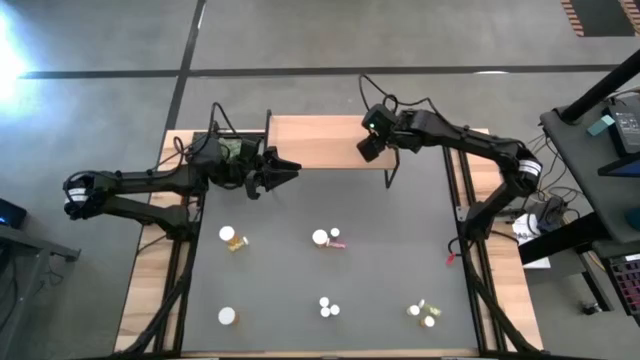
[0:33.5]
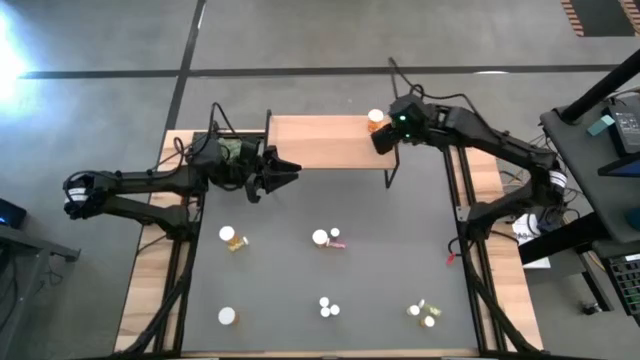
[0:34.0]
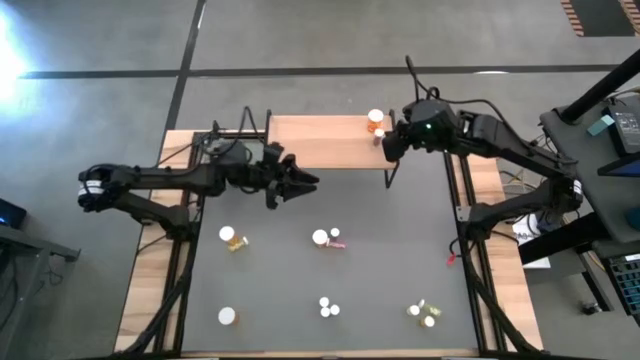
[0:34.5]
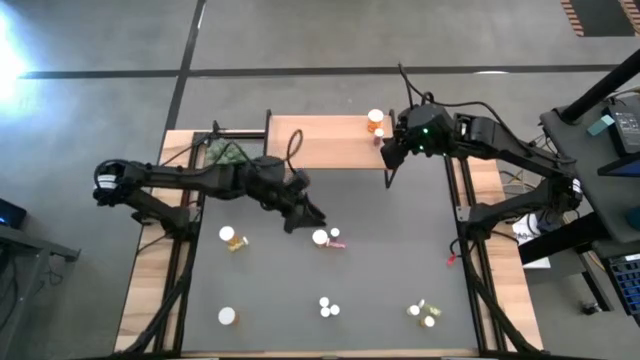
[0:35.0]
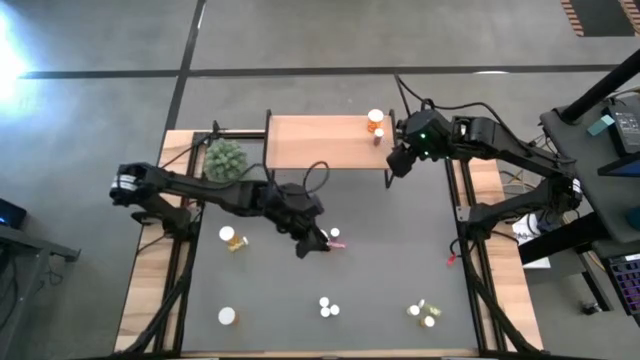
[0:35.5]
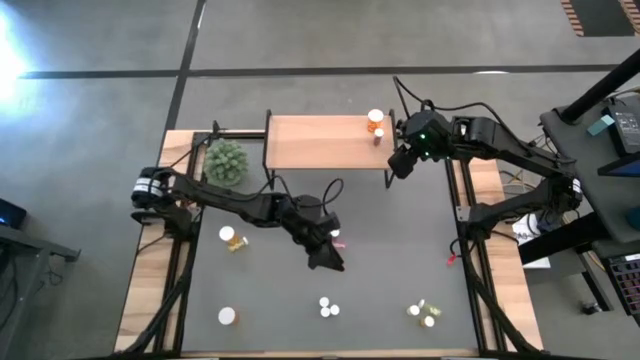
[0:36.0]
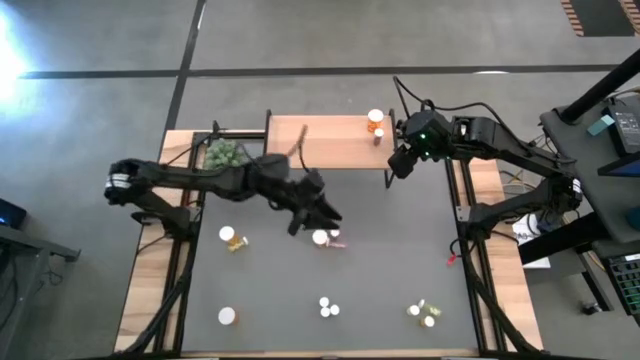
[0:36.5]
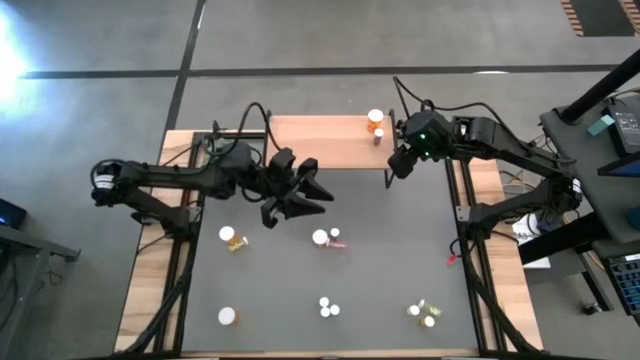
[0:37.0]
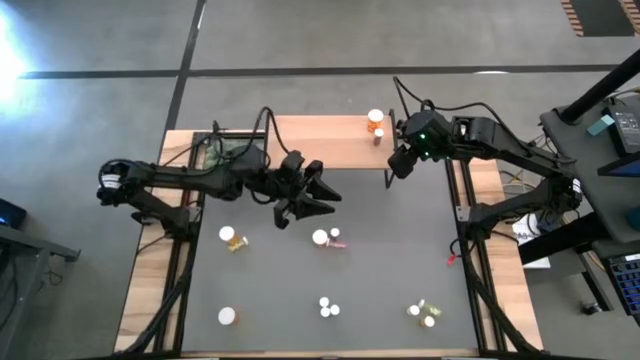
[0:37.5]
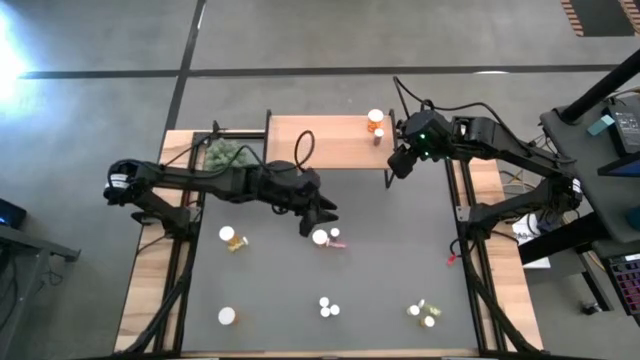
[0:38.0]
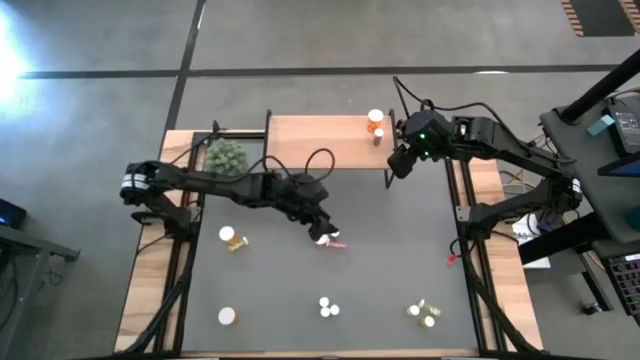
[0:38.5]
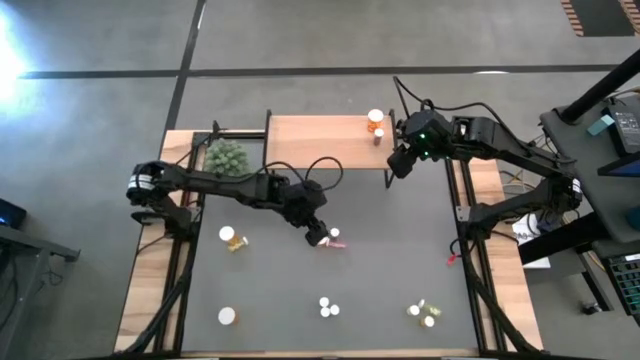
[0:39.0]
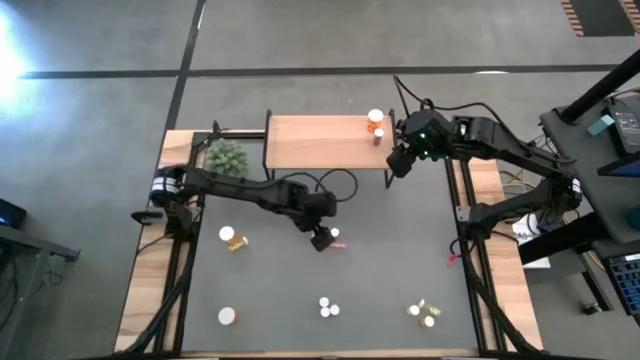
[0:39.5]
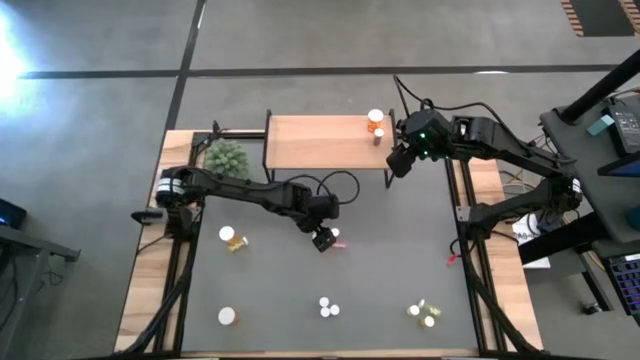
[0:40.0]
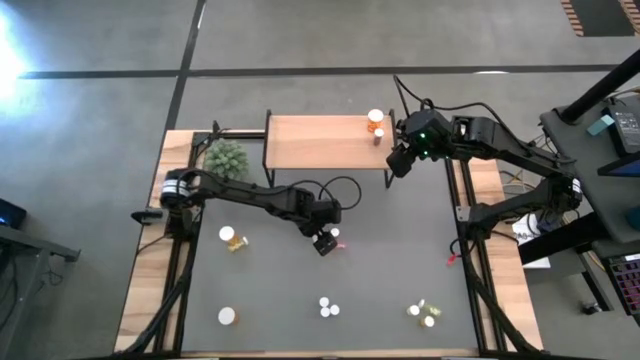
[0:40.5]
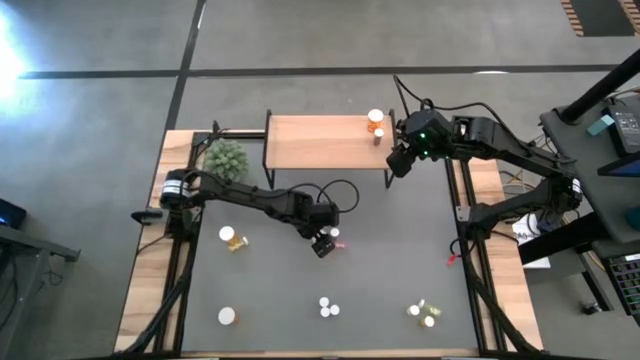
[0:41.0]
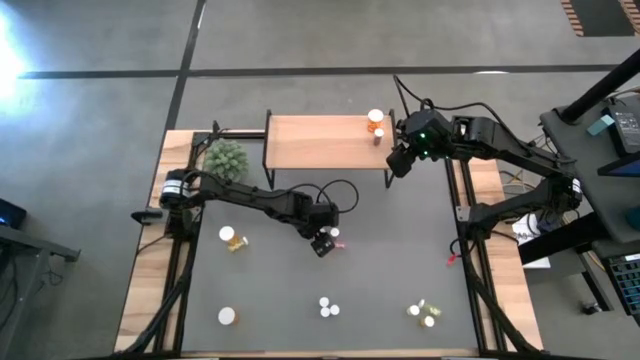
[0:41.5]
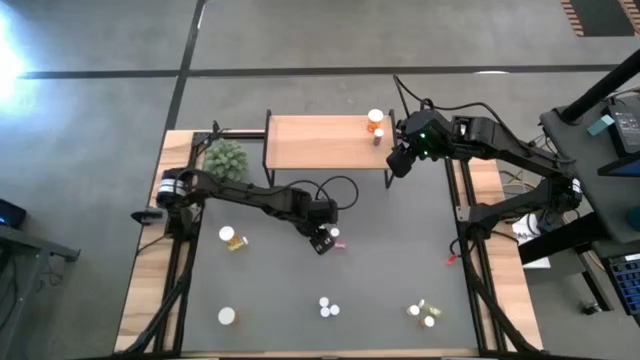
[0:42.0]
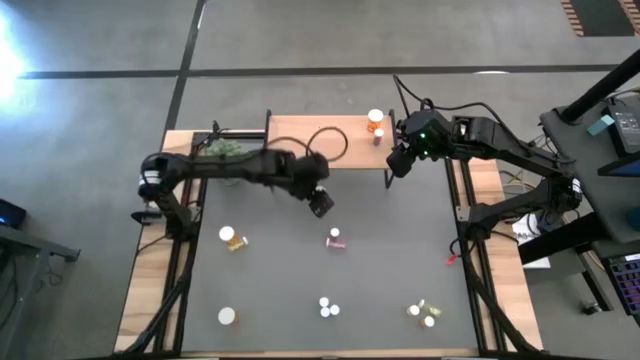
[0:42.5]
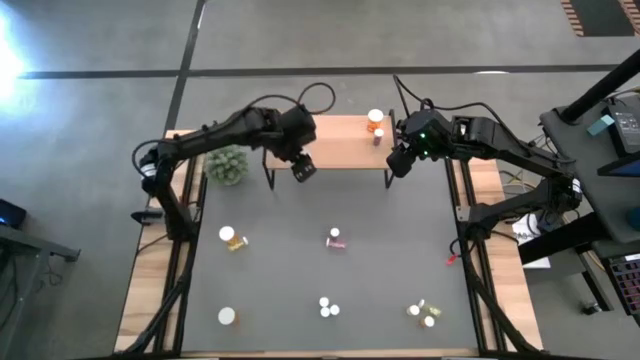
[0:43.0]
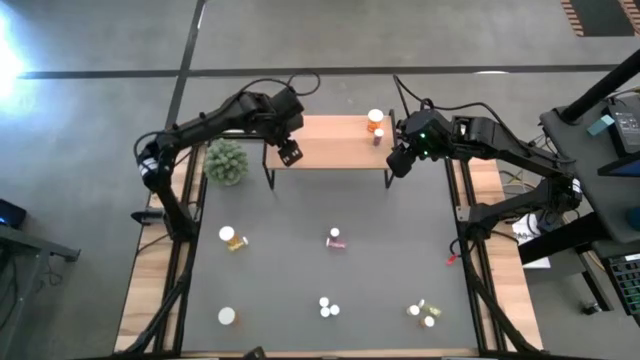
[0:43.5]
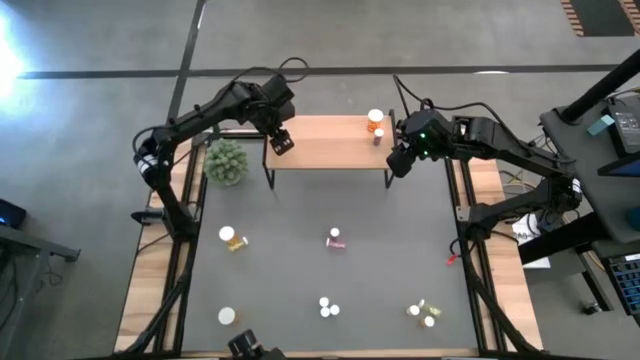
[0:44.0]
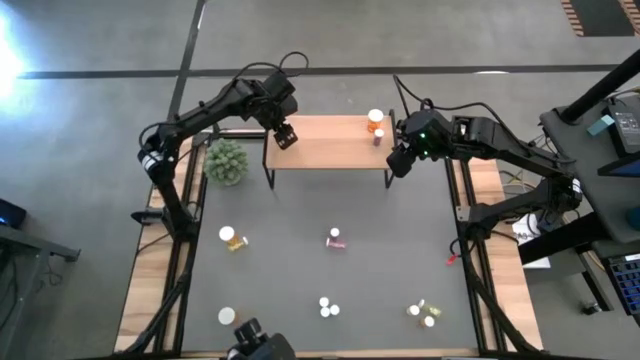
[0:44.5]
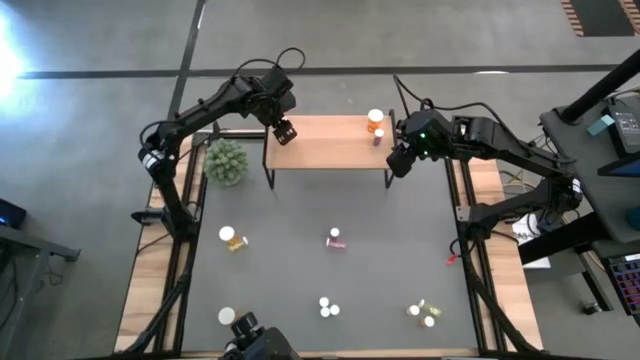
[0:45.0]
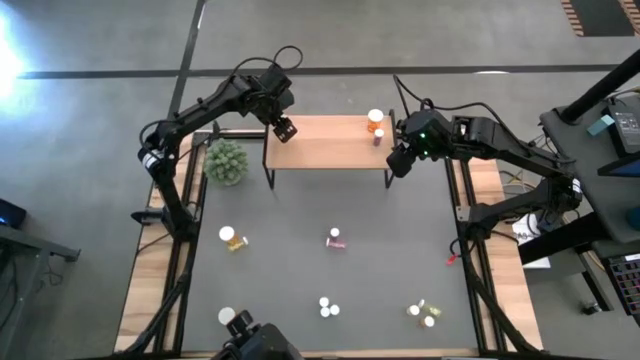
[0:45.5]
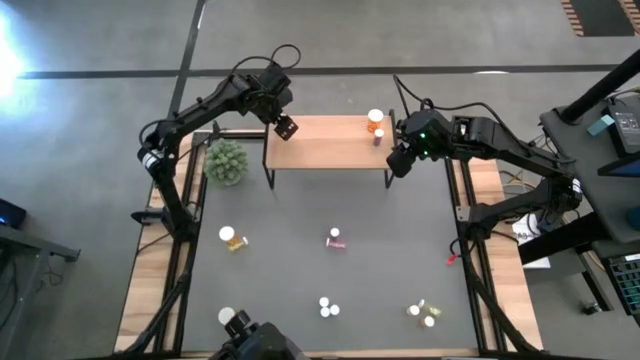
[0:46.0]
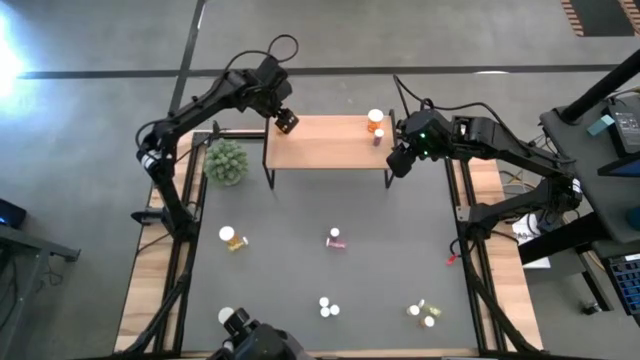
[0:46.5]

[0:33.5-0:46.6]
Task: Pick and place medicine bottles onto shelf by color
Put the large orange pill bottle on the shelf

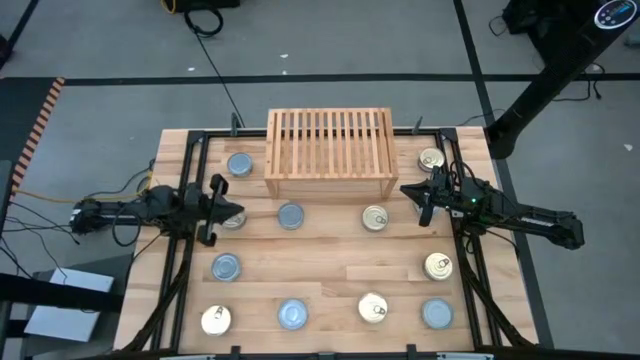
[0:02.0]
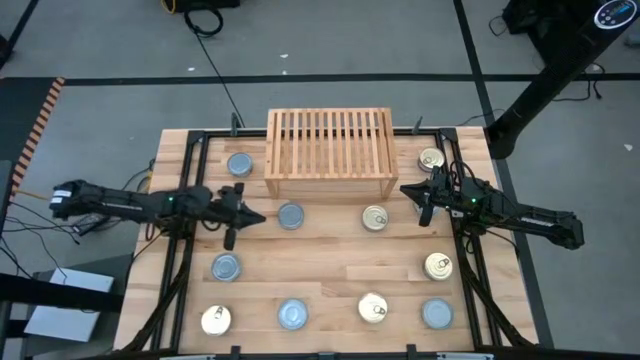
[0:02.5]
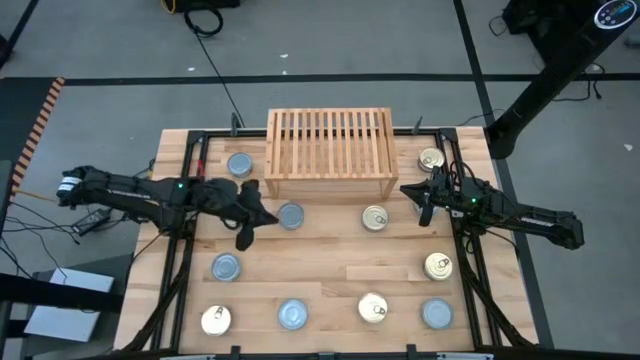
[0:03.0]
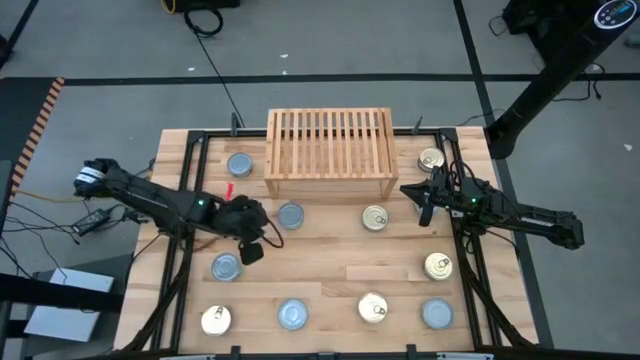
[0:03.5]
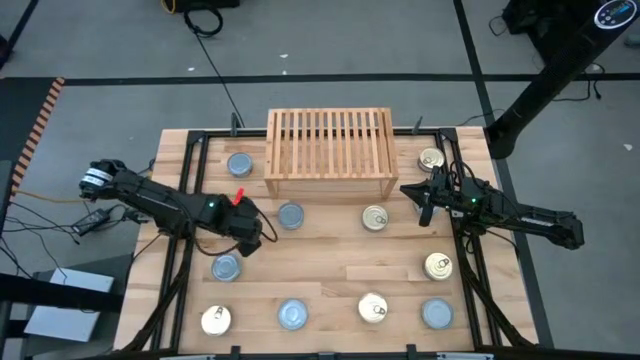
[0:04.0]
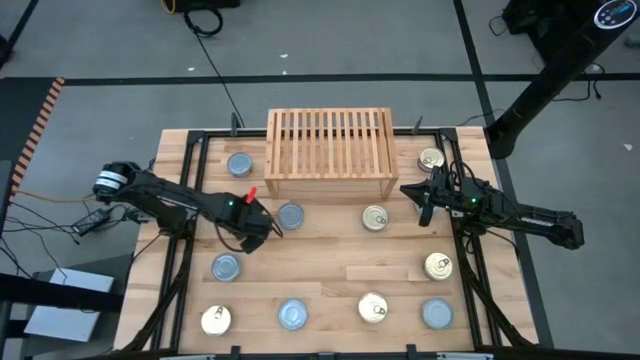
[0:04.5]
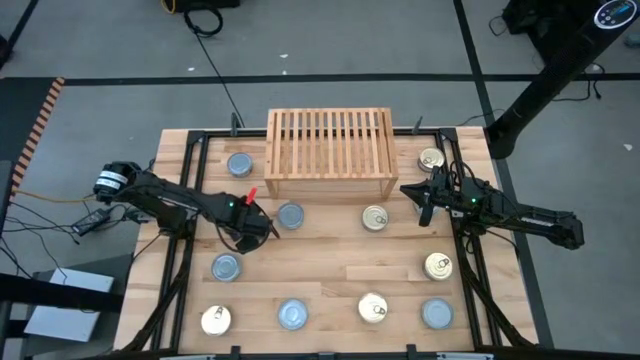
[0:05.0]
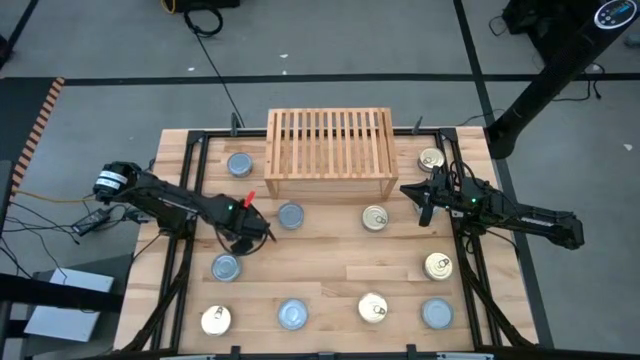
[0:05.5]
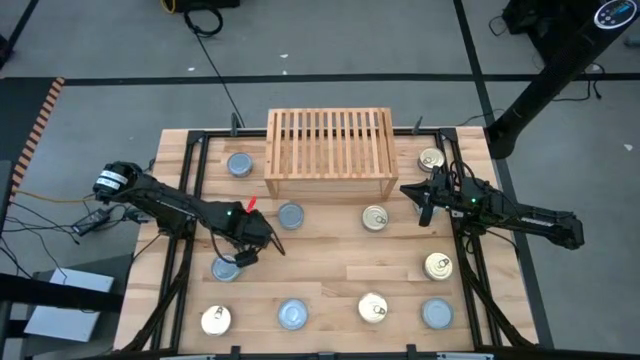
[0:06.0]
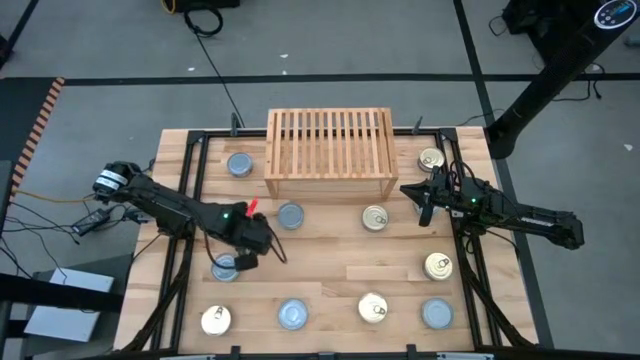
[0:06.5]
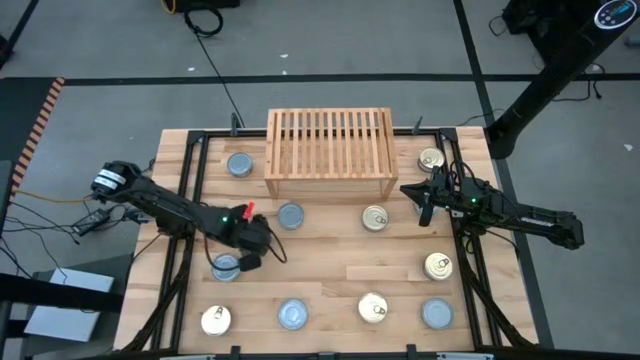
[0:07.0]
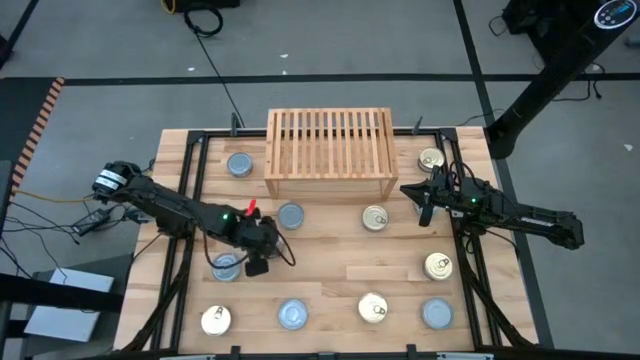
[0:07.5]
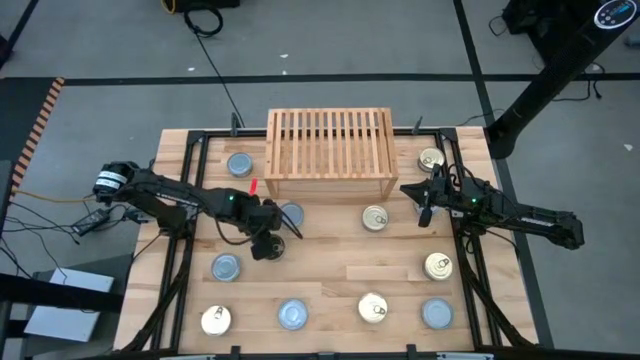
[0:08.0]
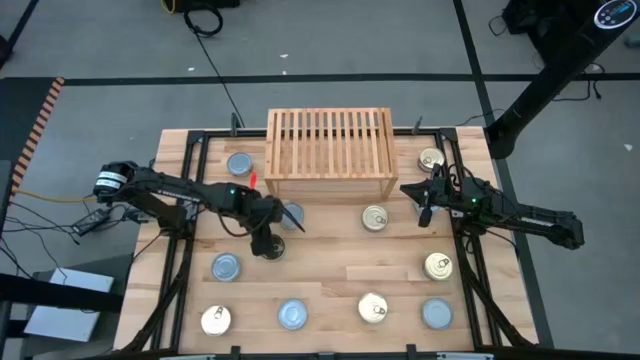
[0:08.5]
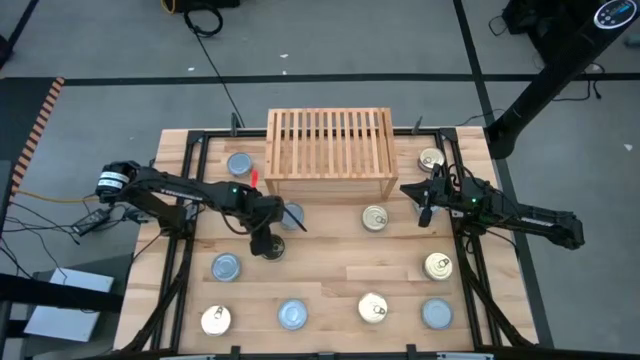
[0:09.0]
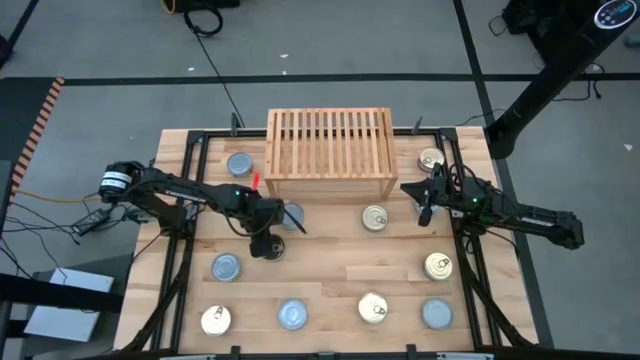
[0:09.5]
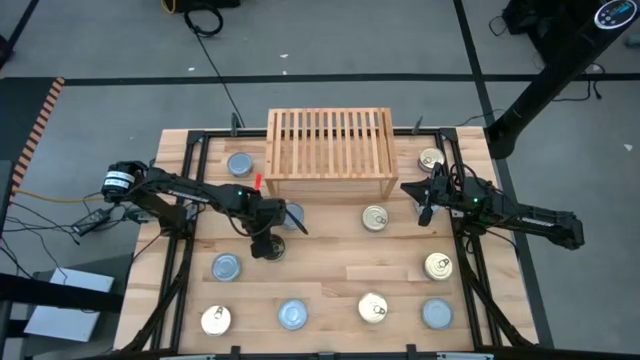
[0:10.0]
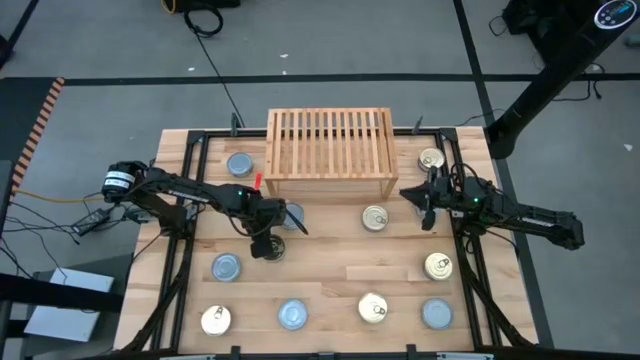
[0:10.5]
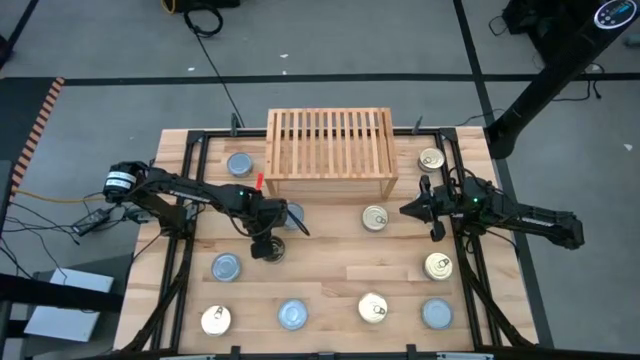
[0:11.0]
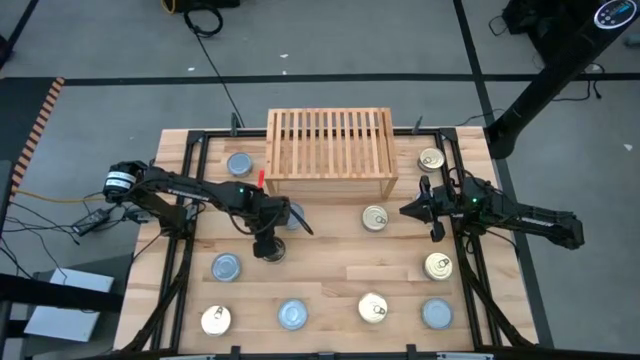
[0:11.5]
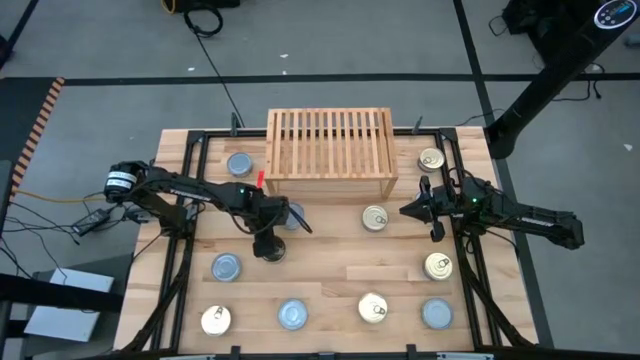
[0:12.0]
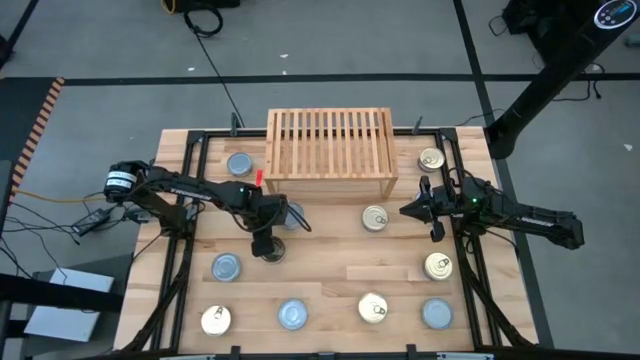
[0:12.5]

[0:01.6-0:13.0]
Task: Stack canned seafood by type on shelf
Put the blue pink tuna can on the shelf
